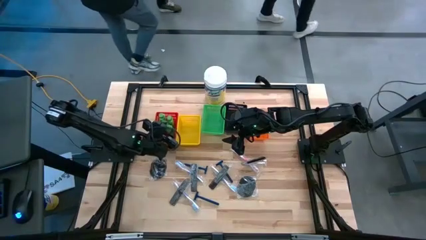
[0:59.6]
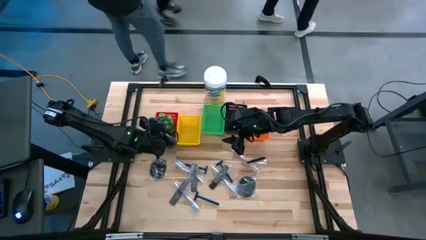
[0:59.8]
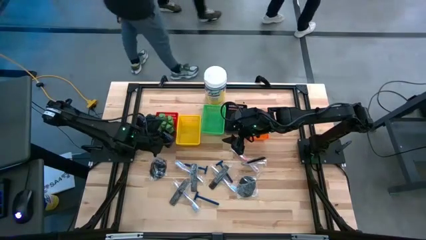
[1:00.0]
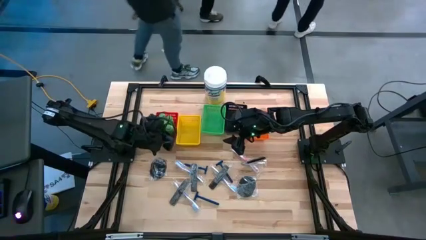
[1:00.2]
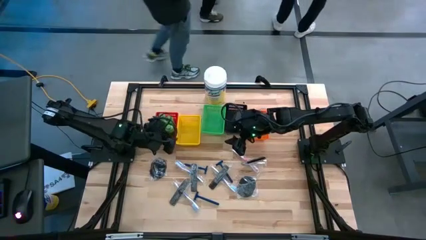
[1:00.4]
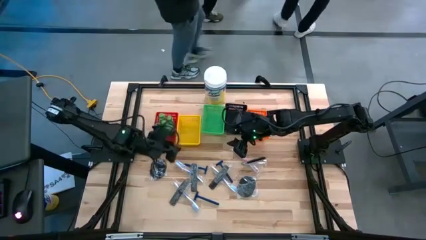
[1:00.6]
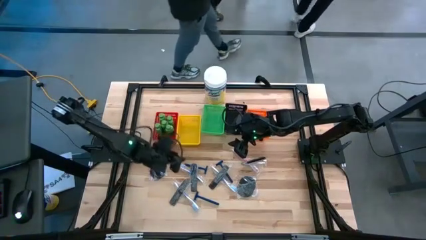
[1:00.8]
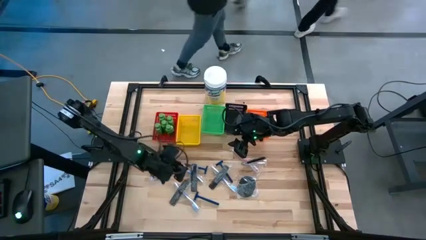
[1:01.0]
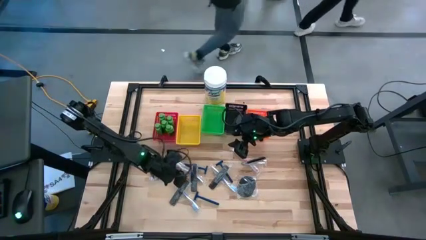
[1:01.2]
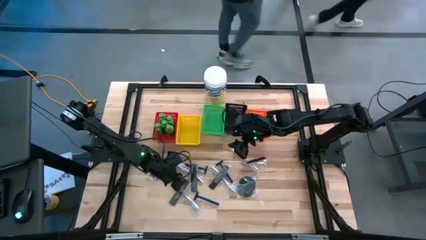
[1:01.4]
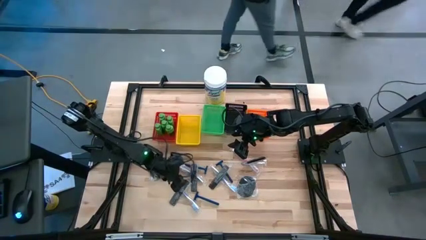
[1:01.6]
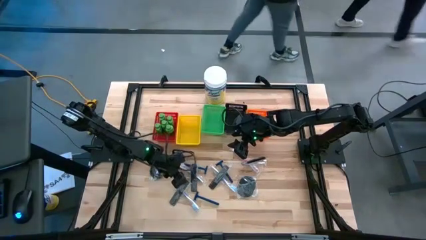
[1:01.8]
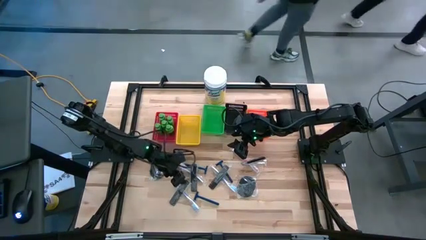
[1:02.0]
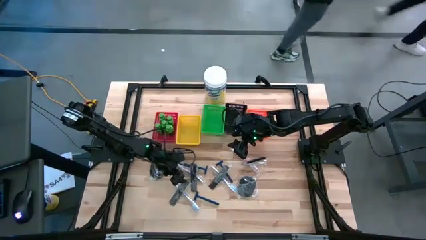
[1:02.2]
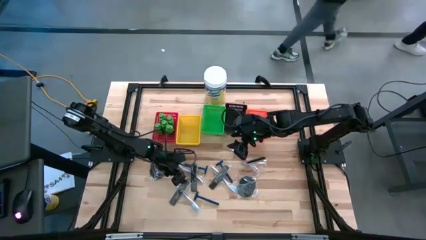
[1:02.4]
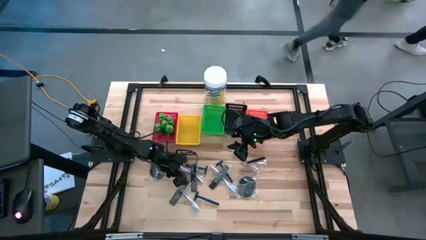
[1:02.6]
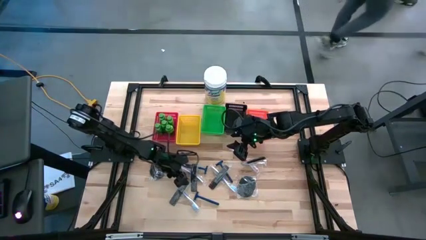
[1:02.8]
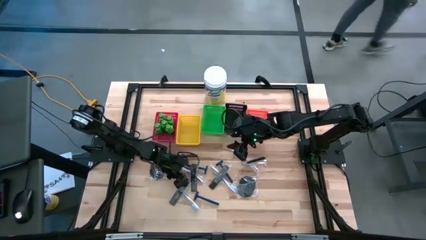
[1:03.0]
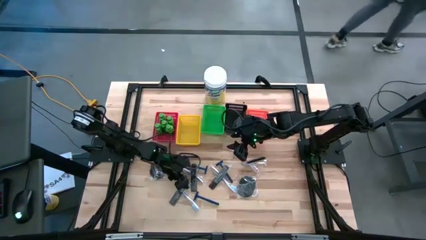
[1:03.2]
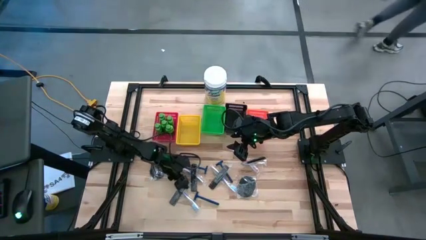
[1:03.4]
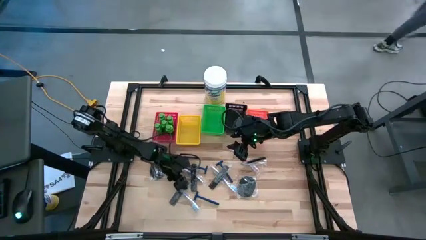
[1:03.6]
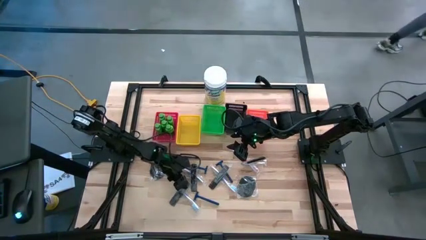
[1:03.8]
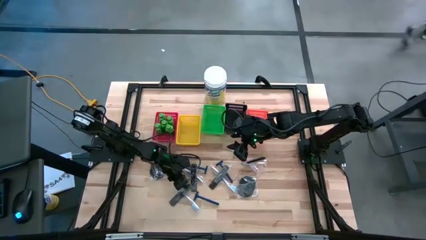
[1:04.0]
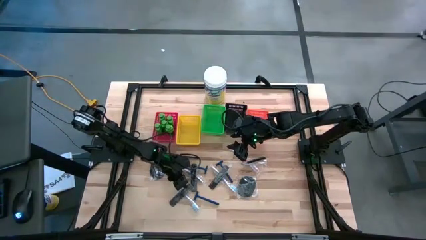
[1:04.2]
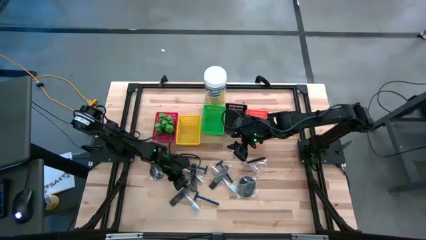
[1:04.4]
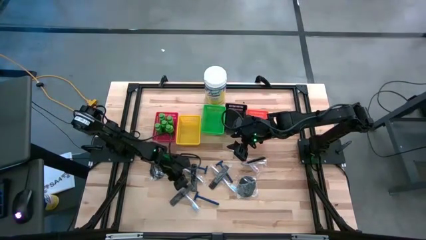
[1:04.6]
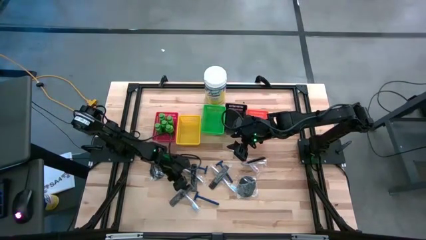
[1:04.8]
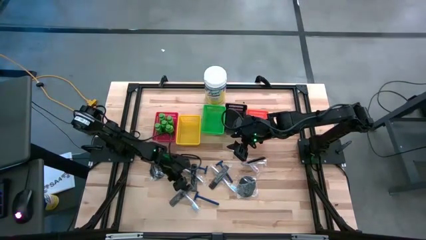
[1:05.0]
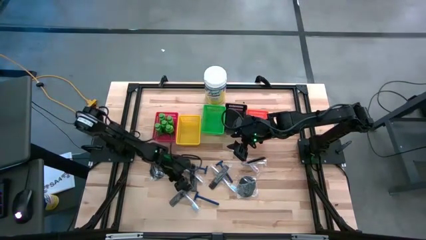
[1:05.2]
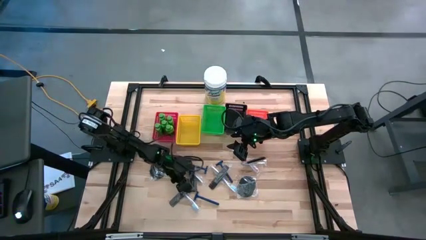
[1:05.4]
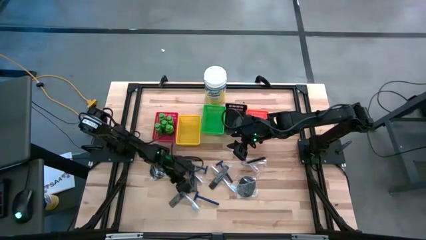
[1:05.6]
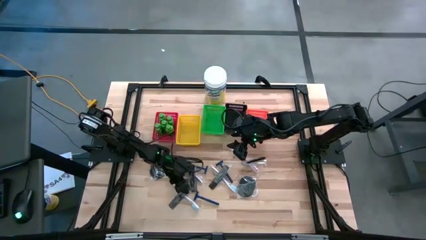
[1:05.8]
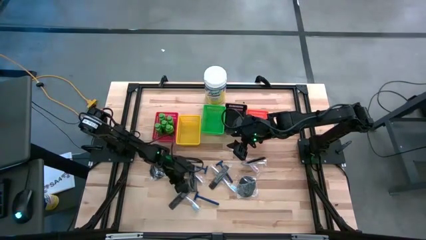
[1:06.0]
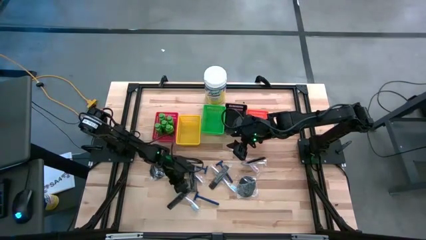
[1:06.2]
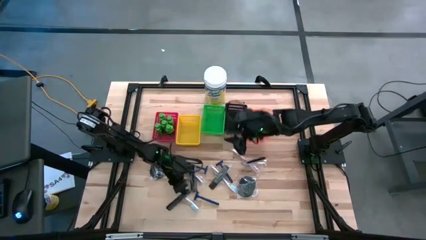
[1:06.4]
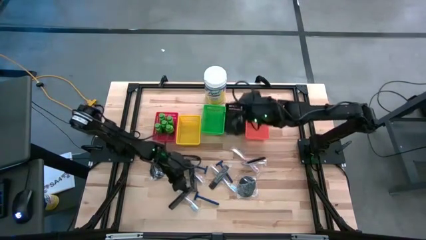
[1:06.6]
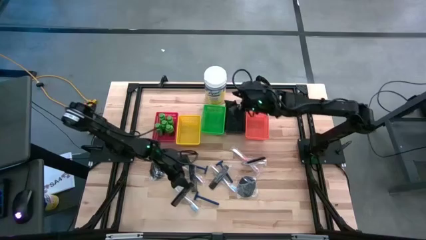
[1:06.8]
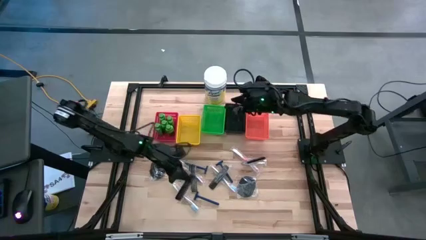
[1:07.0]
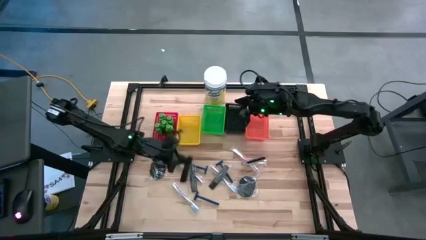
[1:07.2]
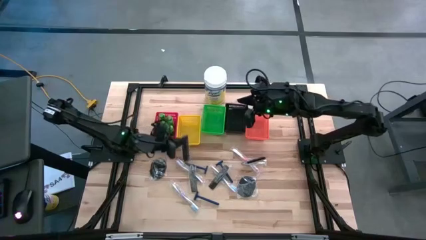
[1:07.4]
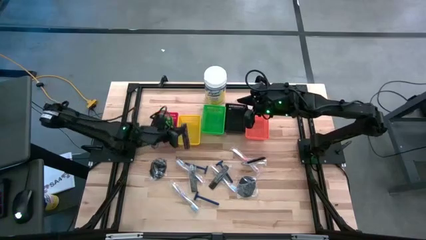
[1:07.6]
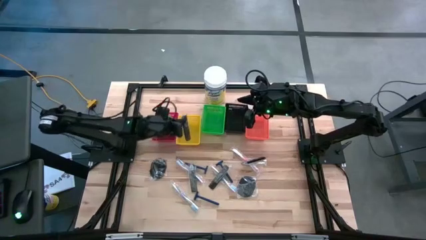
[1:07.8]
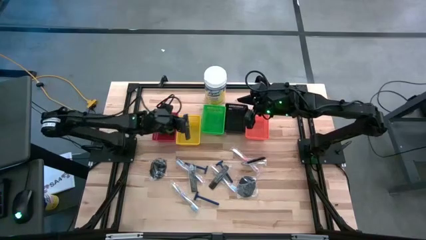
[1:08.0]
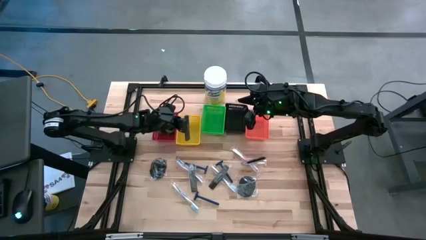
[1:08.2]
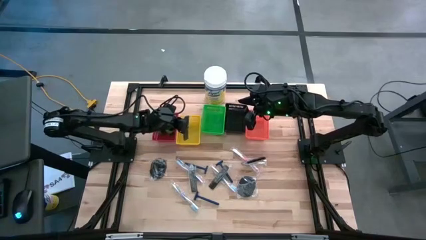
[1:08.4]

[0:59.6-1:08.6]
Task: Pick & Place Travel size toiletries
Put the black hair comb into the yellow bin

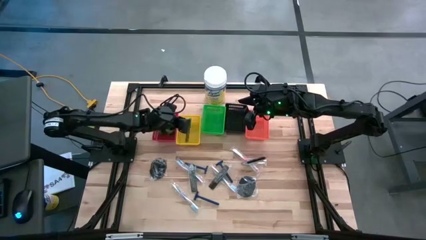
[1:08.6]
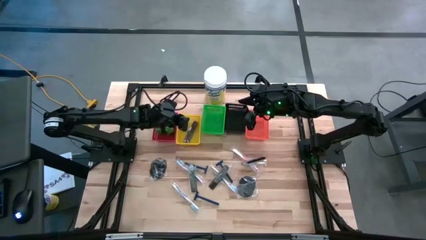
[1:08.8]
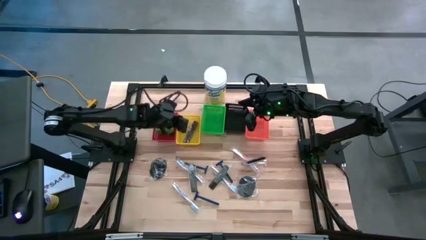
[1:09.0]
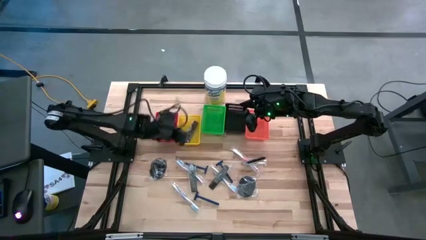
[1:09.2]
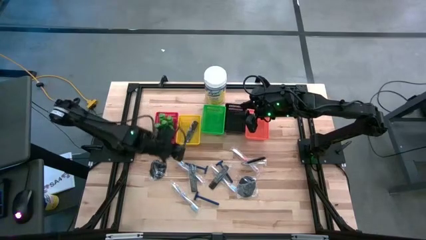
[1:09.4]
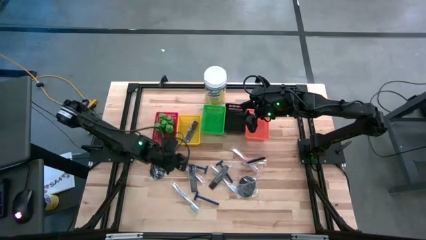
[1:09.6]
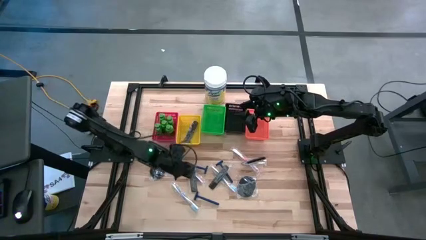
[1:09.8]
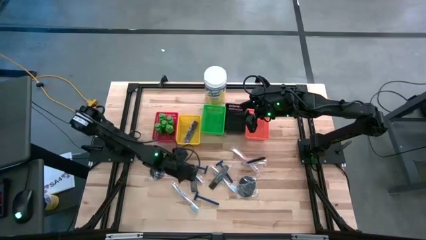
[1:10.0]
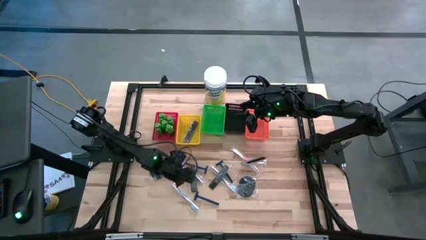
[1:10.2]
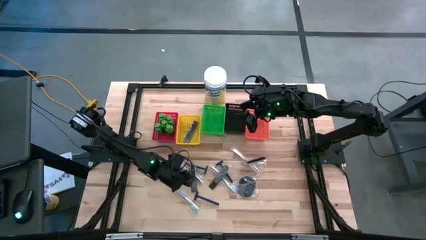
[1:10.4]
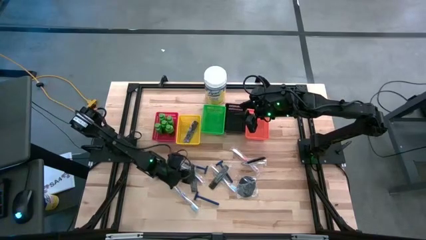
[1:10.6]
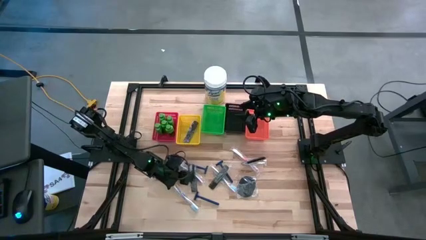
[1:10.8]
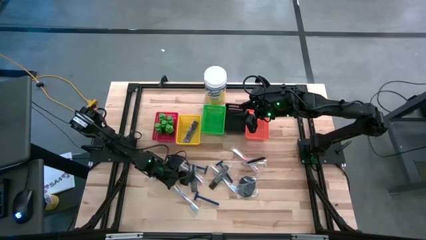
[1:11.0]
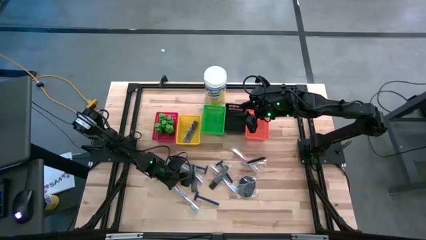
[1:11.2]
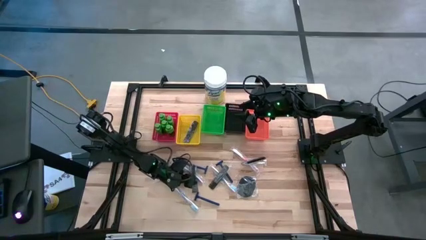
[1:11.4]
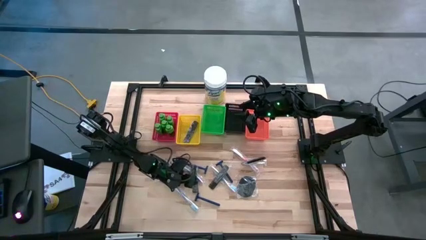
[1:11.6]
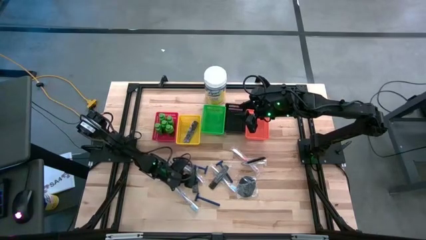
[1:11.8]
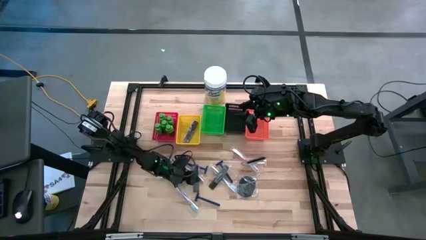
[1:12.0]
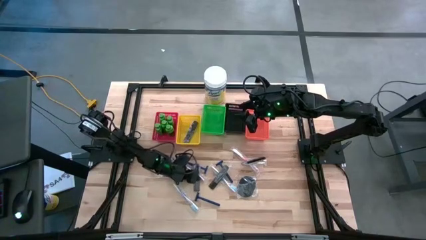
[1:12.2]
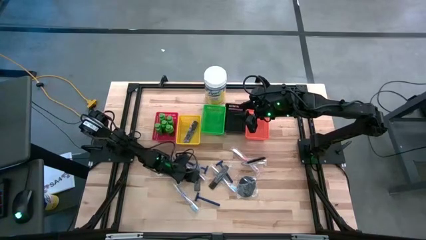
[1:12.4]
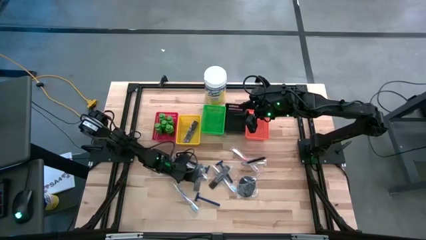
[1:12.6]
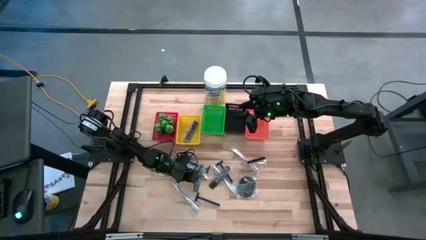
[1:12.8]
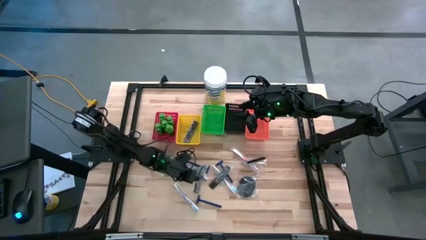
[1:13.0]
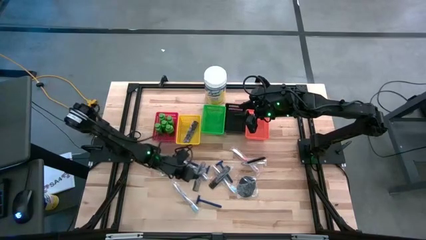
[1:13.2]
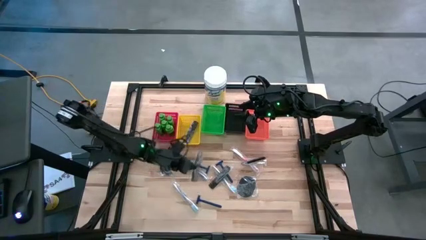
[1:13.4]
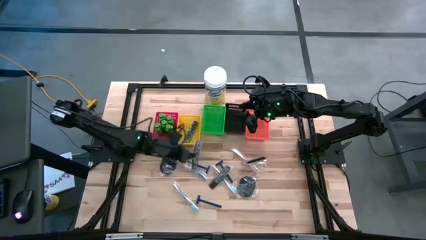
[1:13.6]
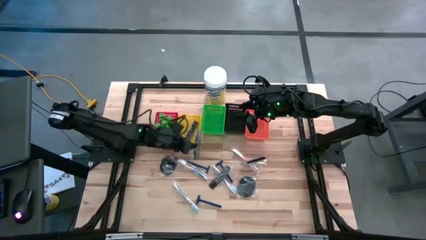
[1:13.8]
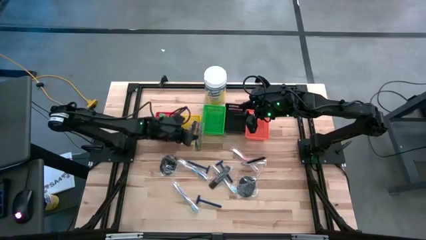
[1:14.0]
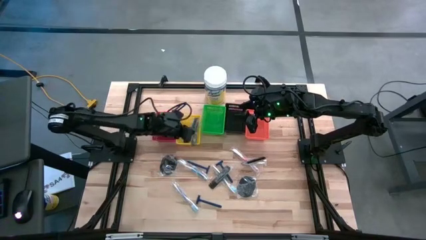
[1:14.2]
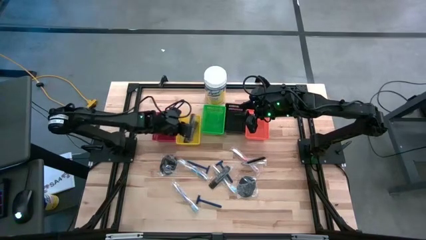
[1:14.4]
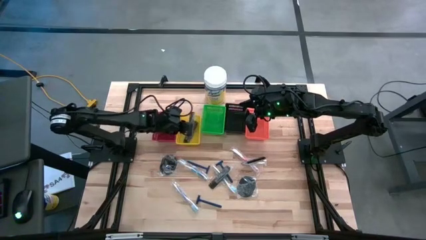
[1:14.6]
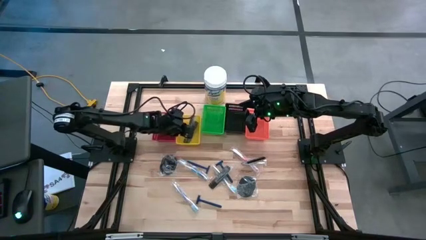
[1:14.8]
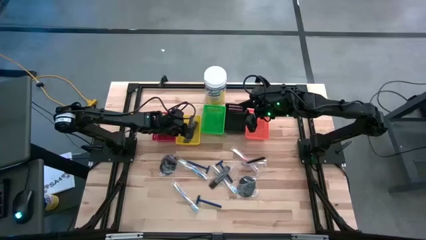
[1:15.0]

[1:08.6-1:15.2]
Put the black hair comb into the yellow bin
